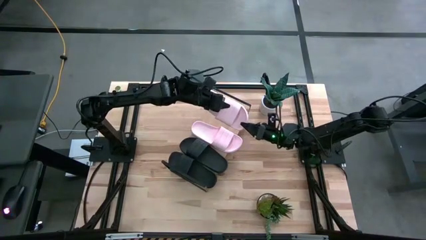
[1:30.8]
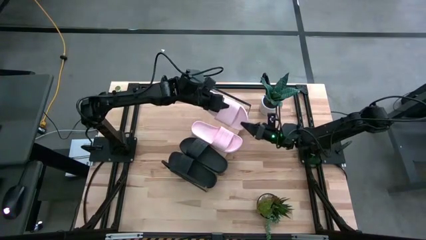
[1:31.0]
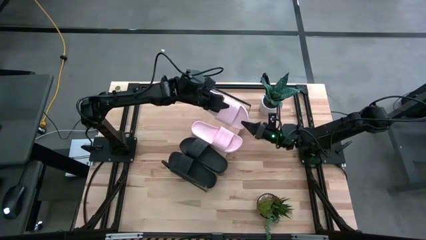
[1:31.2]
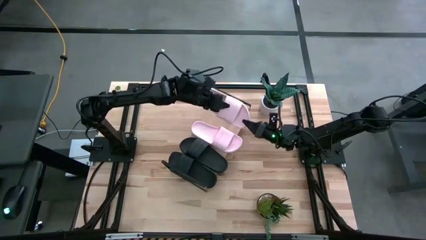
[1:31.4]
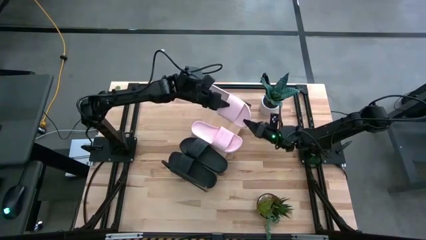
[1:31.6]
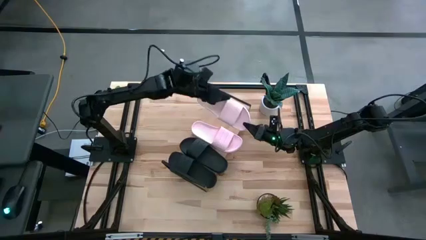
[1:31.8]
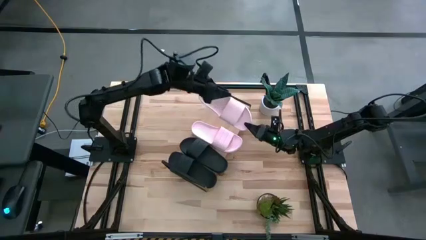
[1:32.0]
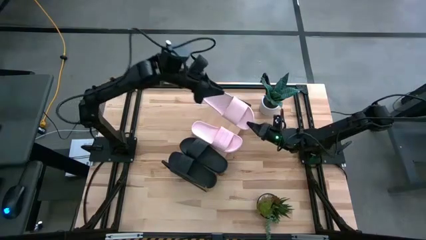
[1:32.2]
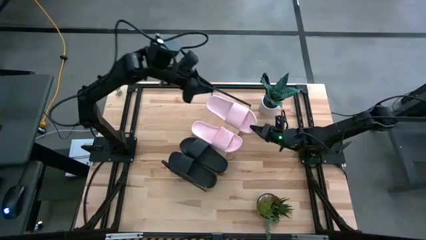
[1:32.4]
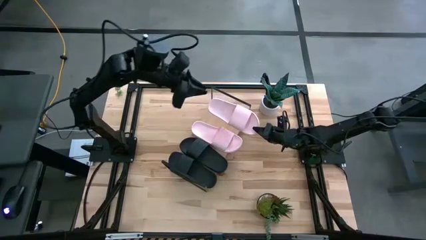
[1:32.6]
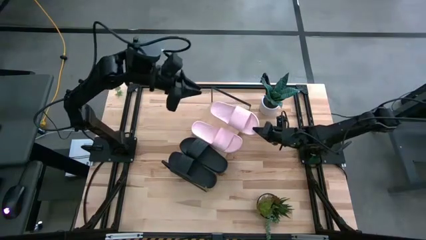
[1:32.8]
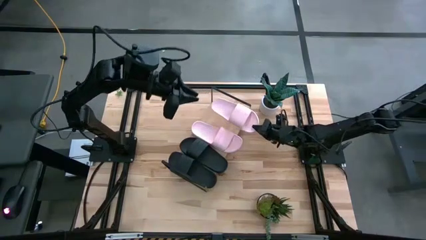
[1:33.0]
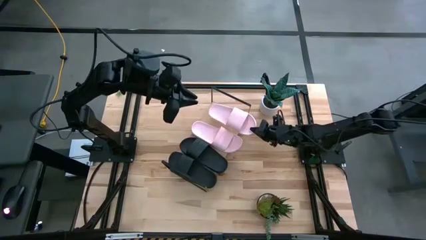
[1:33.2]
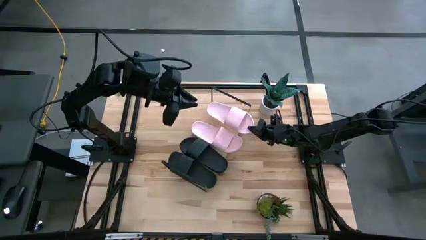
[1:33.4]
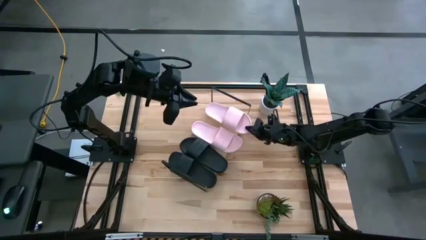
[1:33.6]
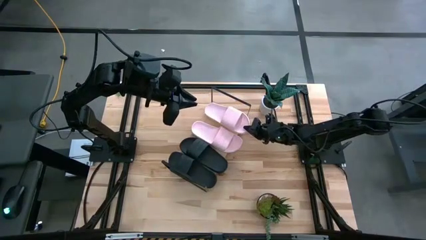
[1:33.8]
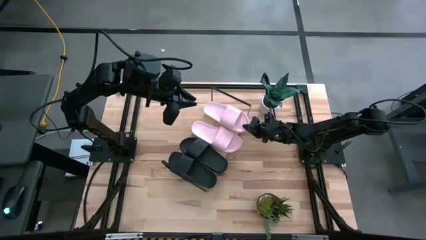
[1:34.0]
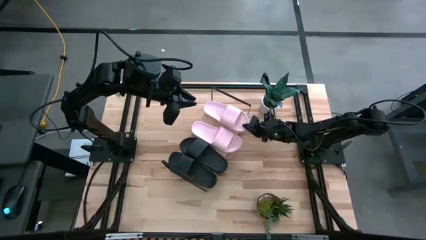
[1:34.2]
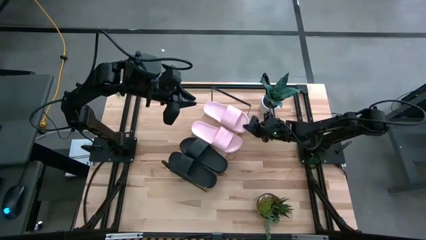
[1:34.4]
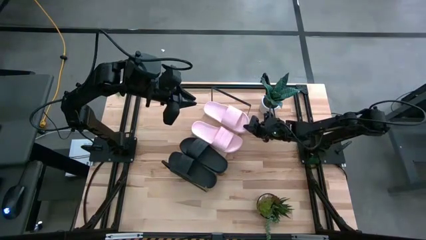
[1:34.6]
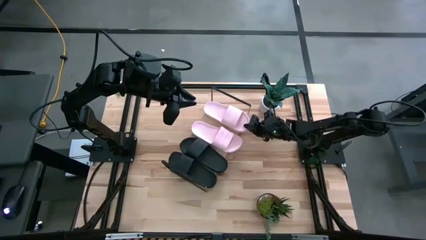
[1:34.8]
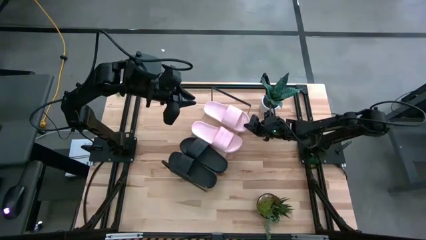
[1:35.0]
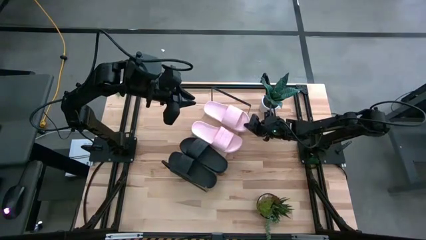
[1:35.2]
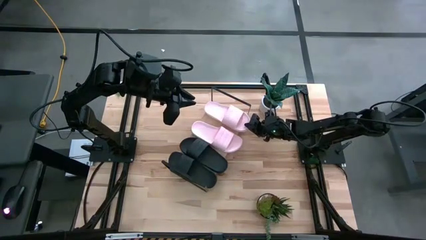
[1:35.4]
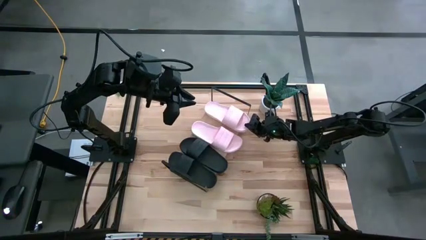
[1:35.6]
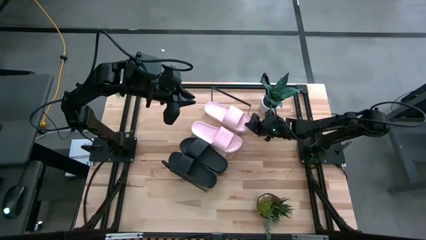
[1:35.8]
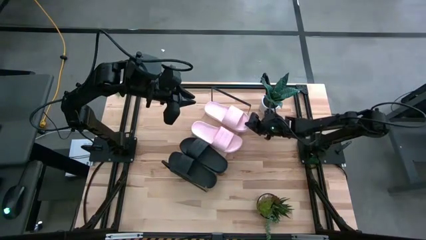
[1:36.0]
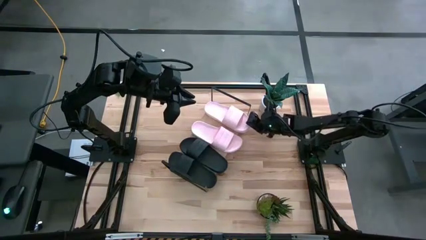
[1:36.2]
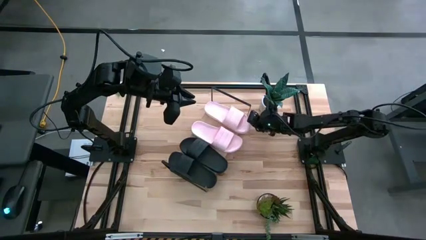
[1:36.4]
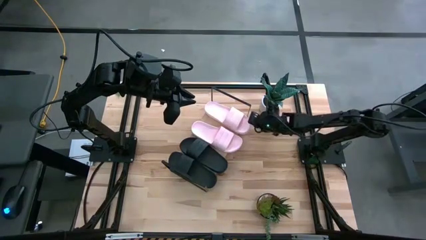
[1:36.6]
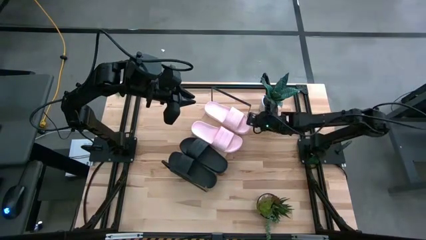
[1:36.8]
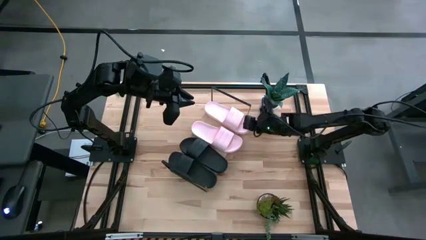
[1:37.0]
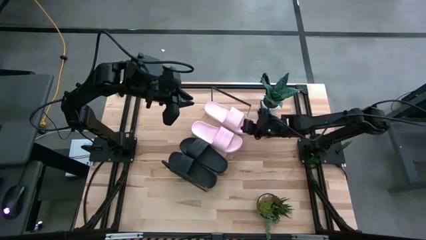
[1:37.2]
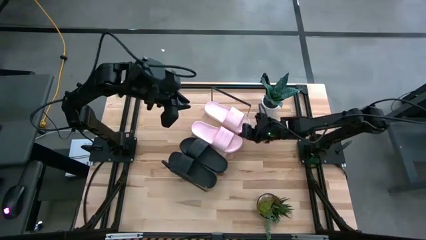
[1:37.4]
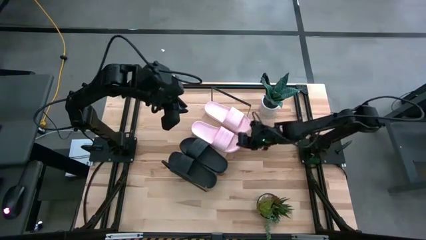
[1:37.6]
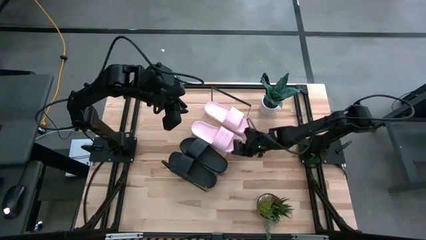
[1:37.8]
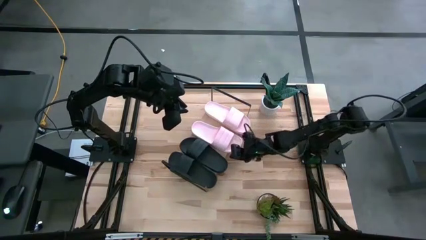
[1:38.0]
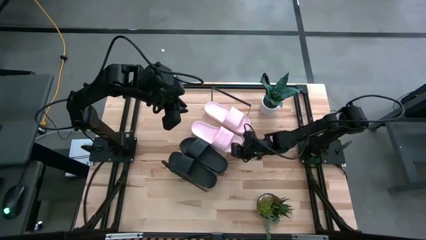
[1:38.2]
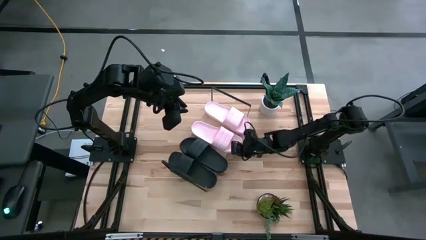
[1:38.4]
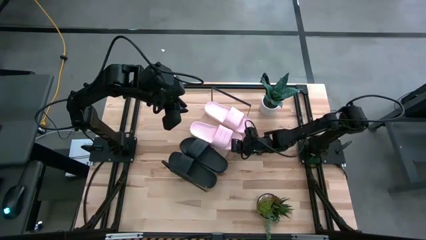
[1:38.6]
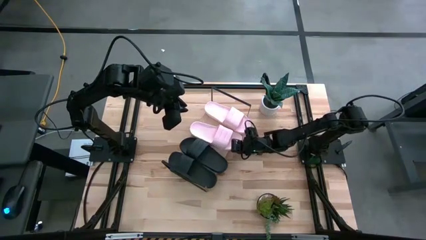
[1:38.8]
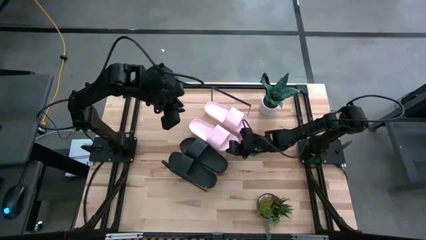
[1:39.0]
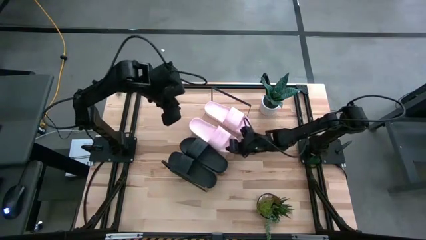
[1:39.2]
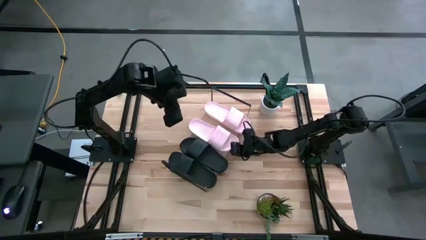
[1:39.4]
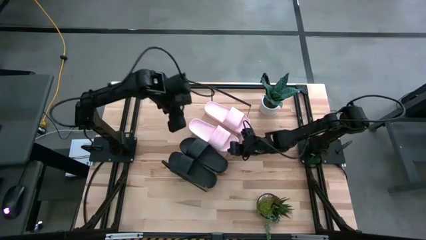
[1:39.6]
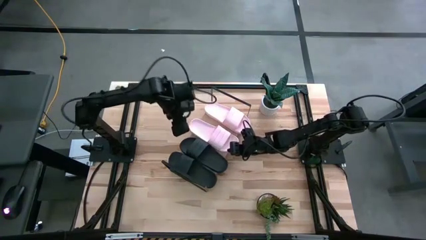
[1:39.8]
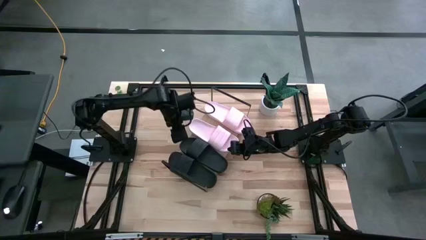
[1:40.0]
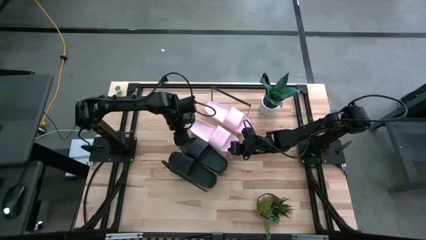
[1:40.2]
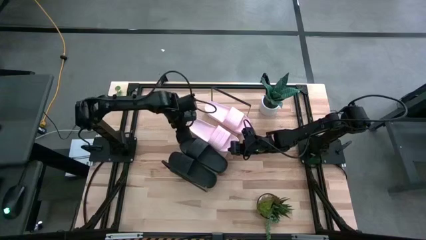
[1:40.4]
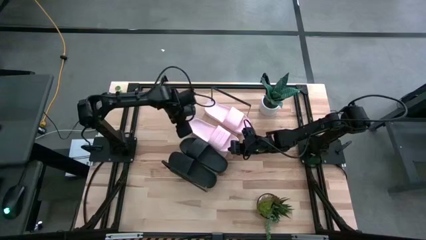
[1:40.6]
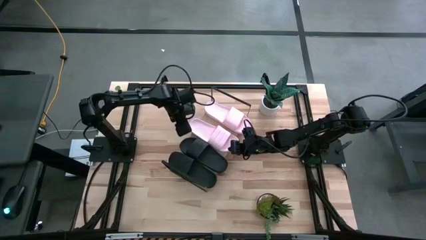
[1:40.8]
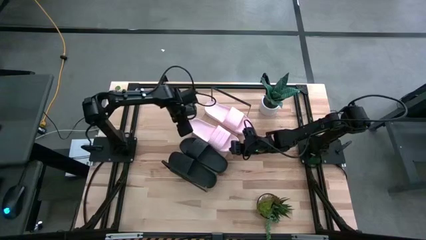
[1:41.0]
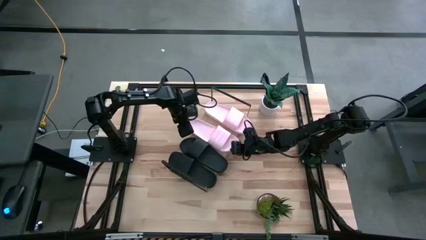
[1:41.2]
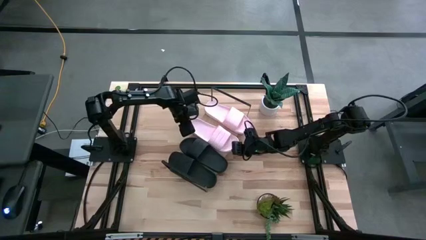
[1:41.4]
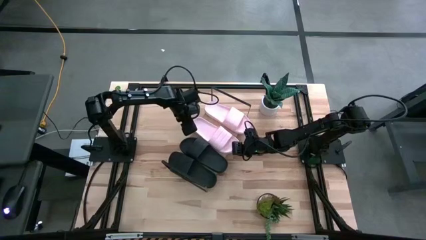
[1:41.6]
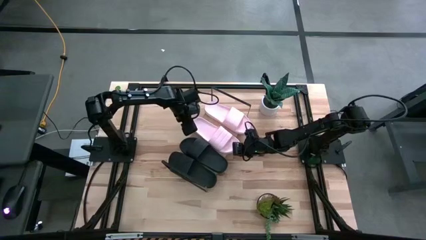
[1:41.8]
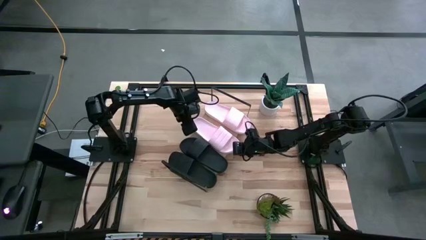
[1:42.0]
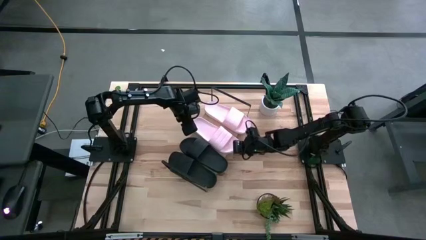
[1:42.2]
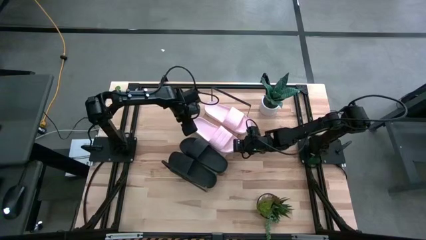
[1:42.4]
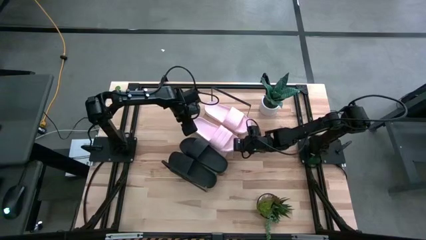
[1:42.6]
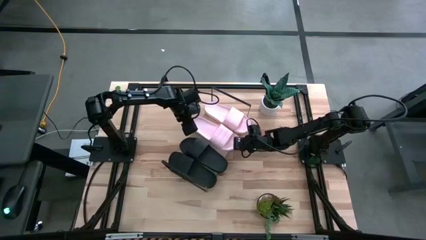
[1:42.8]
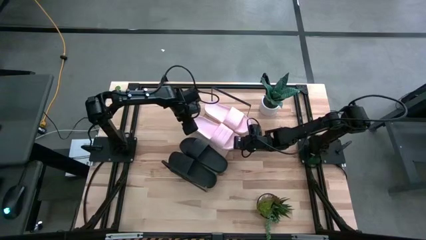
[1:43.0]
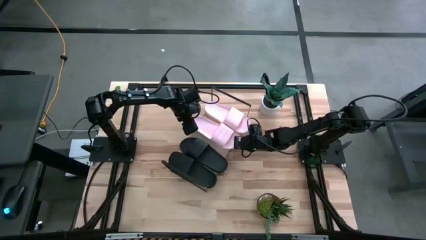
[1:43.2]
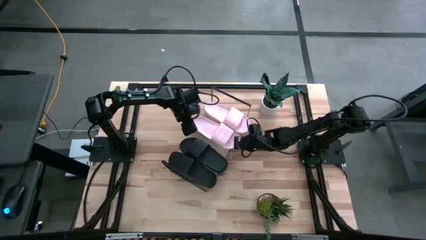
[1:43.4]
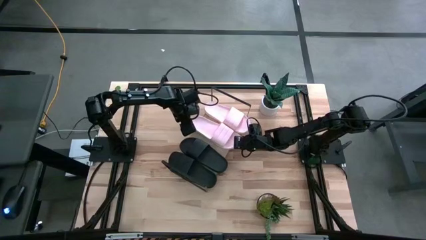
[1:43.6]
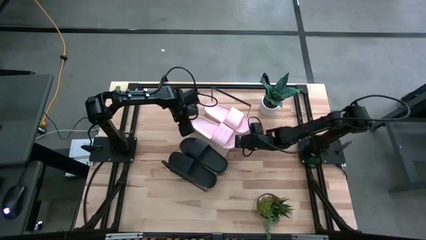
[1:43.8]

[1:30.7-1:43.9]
Task: Pick and place slides into the shelf
Put the pink slipper on the shelf
